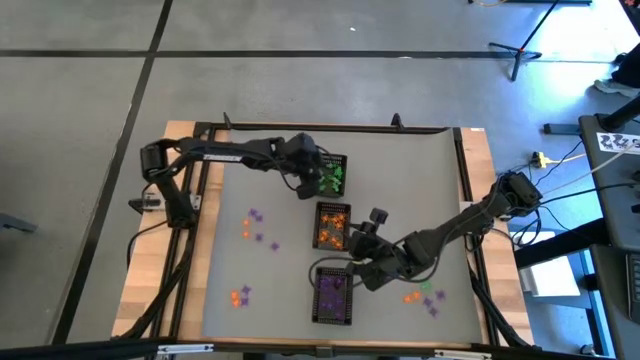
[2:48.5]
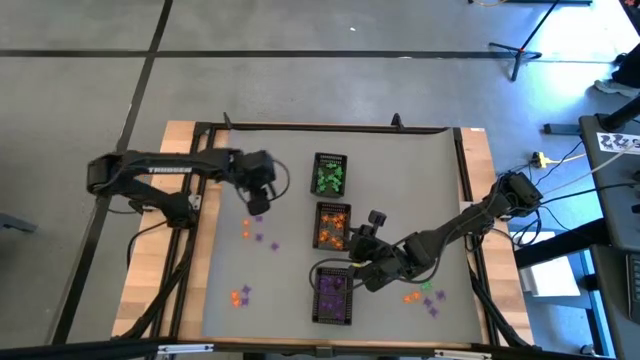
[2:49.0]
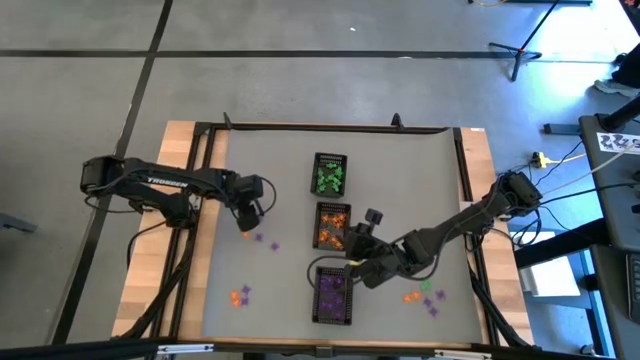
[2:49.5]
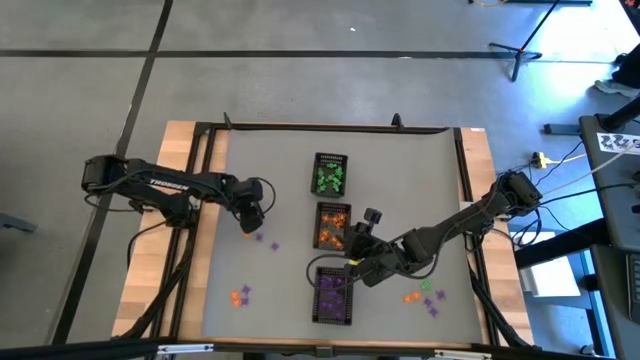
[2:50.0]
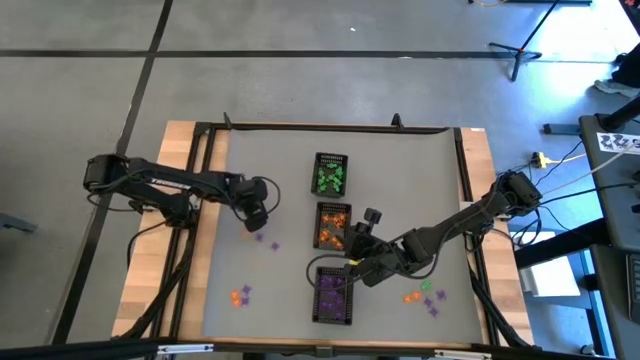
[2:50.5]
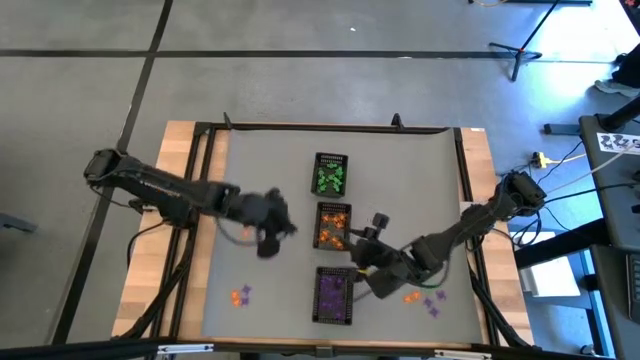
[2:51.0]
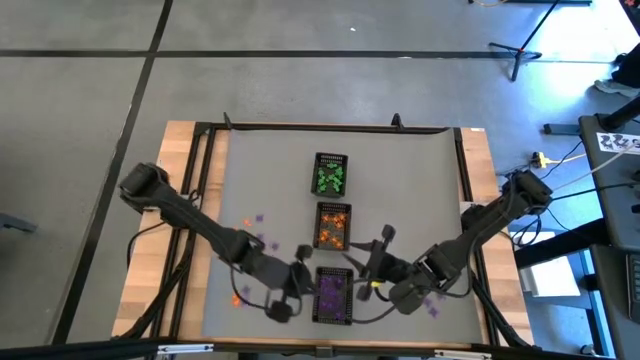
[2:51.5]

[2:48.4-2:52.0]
Task: Sort Halloween decoration
Put the violet spider toy into the bottom black bin

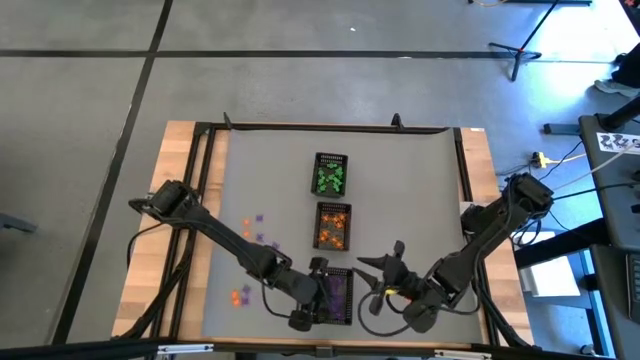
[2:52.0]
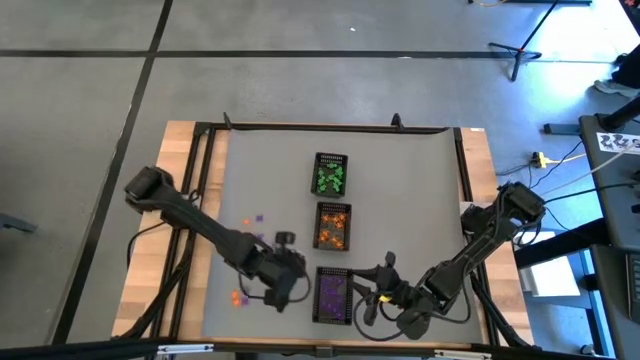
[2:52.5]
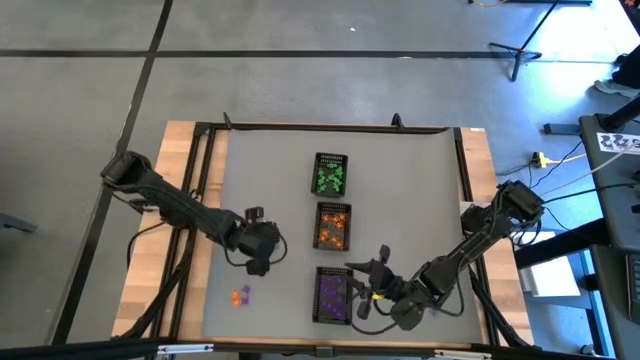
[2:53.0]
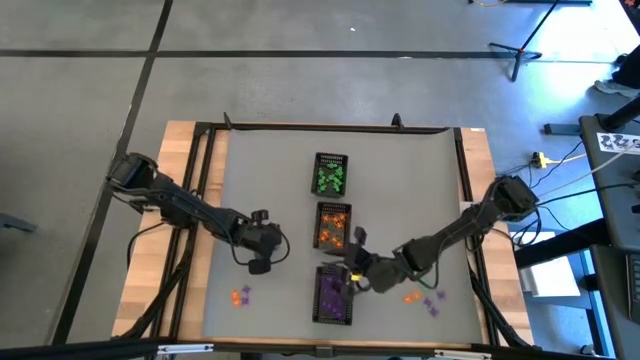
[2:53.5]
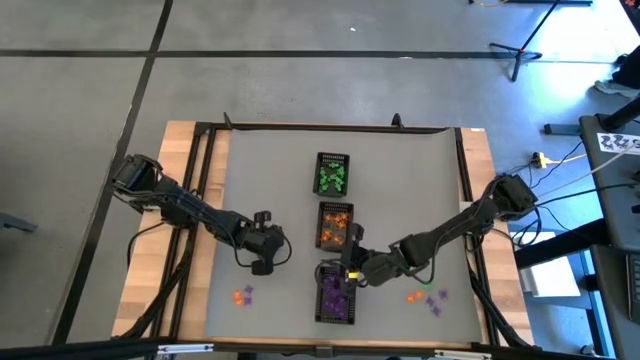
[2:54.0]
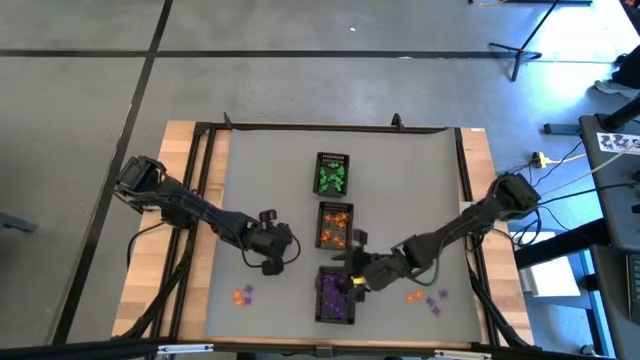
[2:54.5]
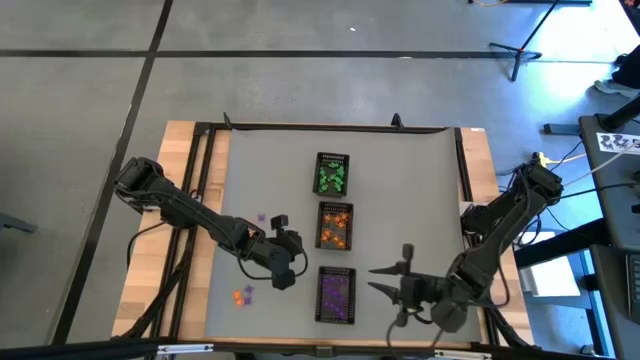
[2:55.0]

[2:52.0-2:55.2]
Put the violet spider toy into the bottom black bin

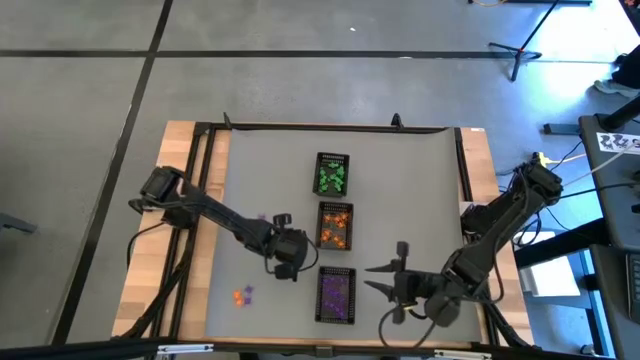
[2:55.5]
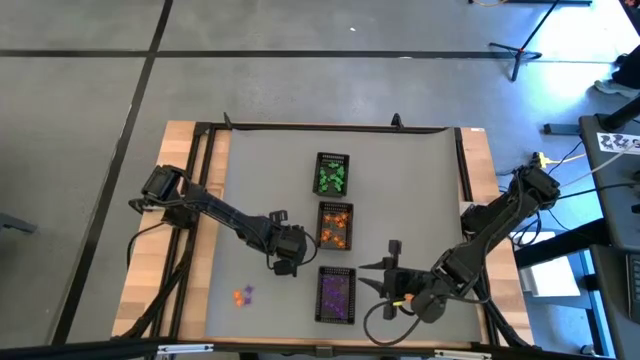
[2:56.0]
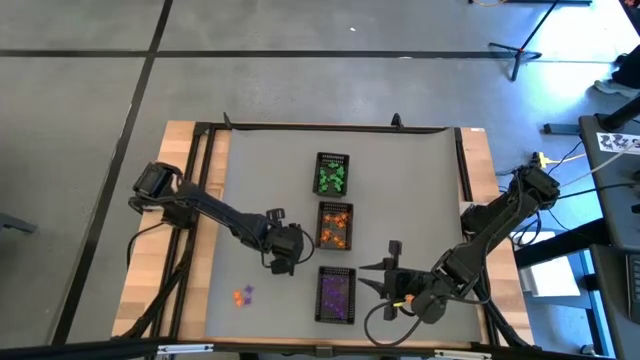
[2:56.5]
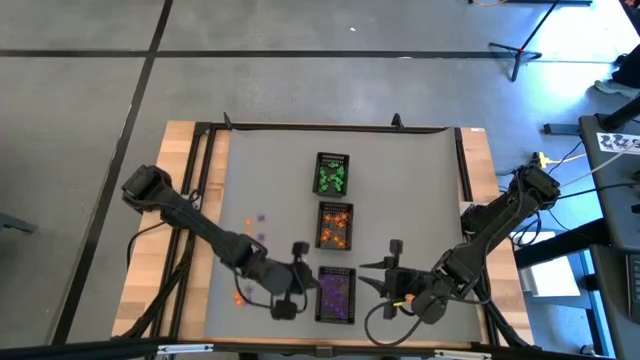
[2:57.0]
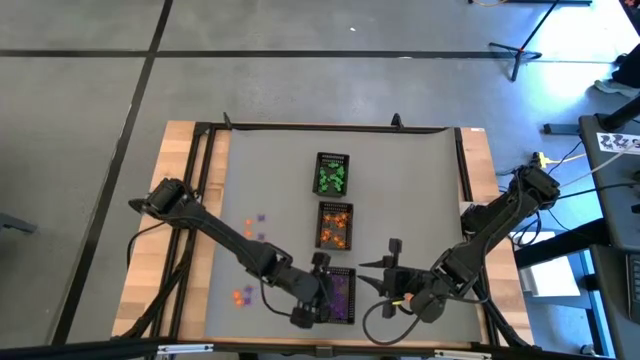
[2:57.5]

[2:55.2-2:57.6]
Put the violet spider toy into the bottom black bin

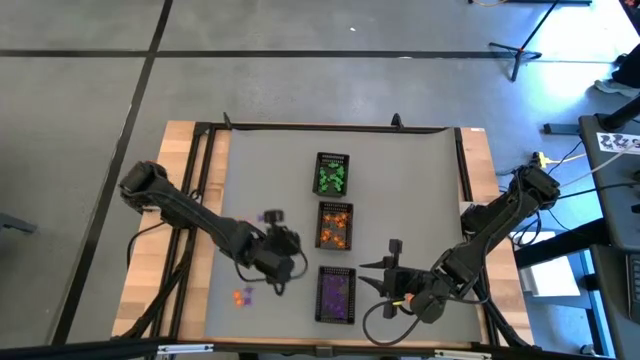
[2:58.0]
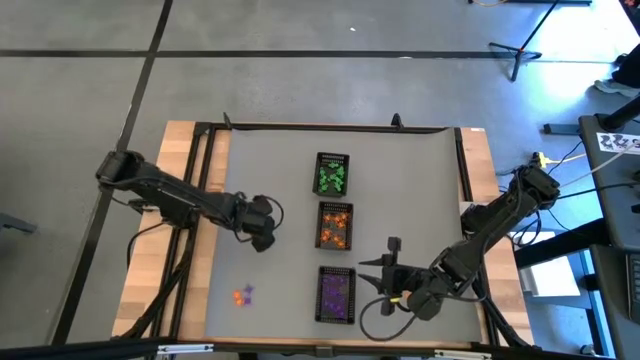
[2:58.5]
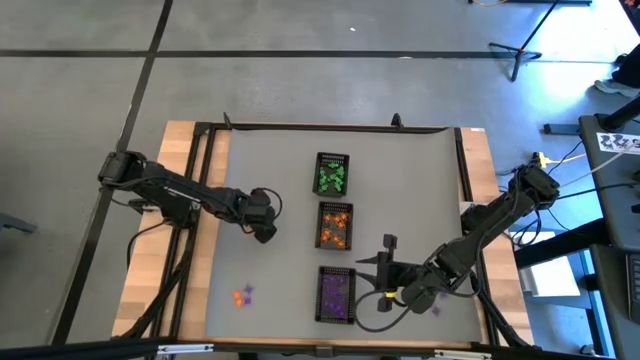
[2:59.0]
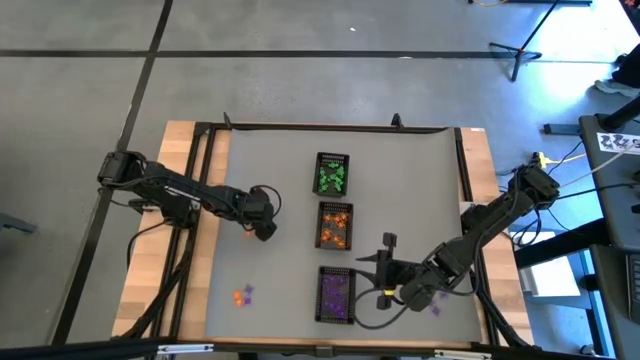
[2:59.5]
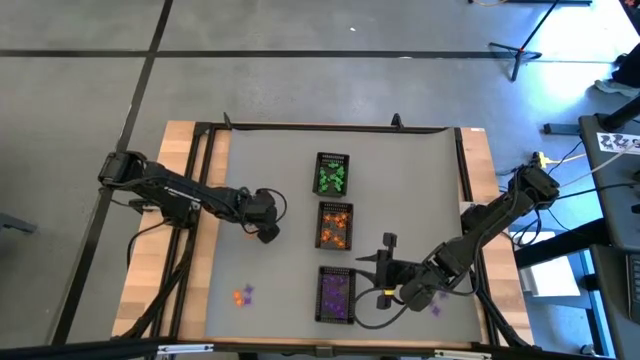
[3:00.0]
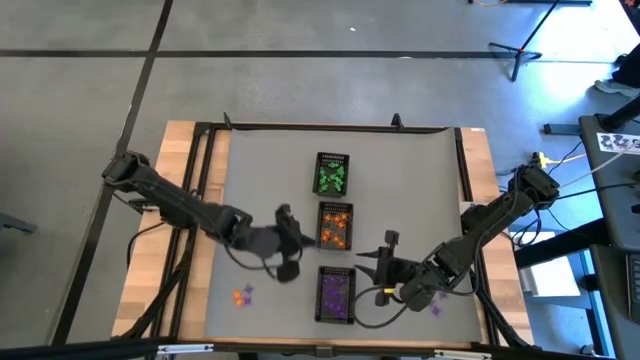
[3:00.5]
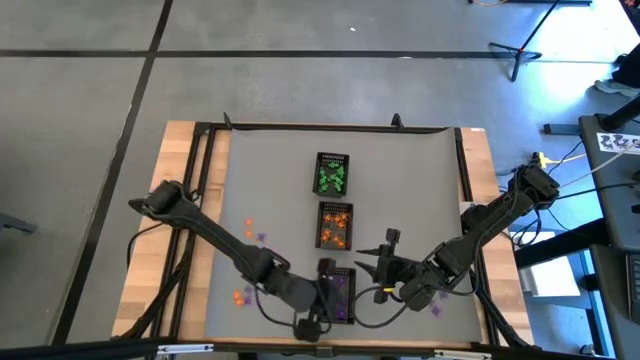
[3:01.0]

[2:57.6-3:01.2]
Put the violet spider toy into the bottom black bin

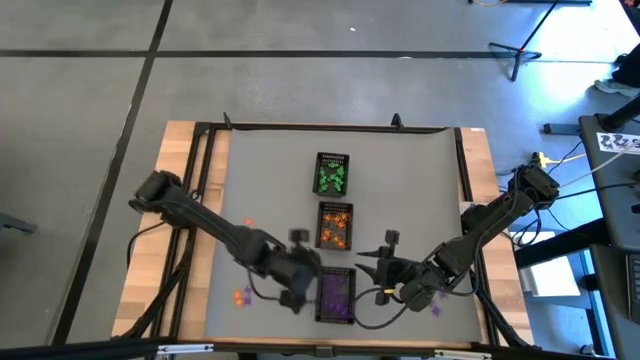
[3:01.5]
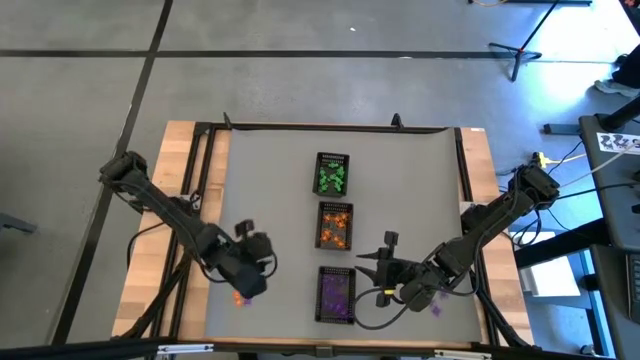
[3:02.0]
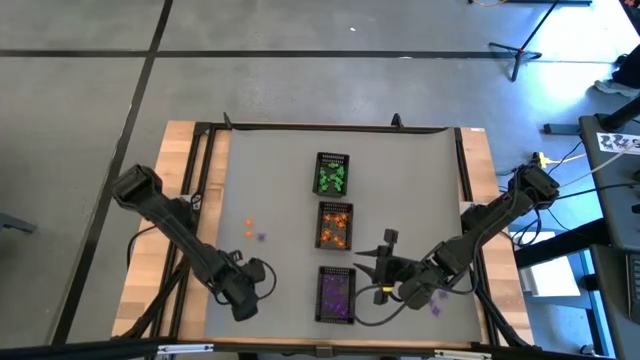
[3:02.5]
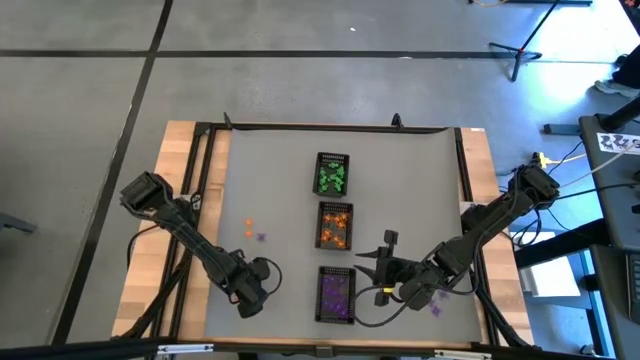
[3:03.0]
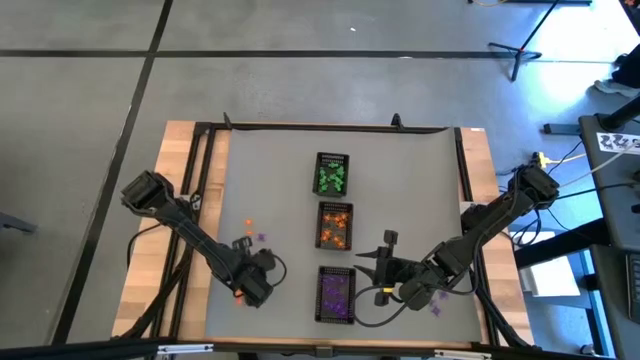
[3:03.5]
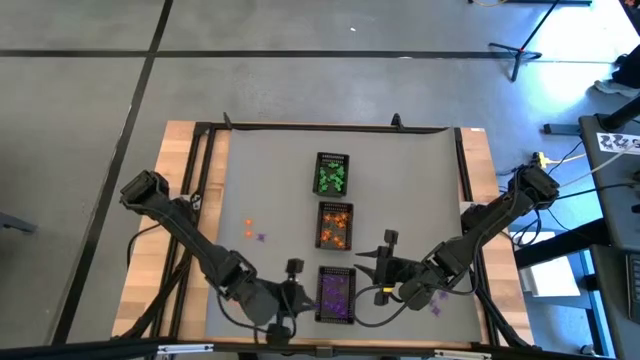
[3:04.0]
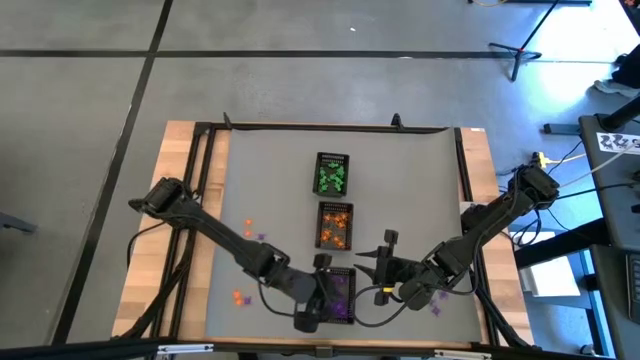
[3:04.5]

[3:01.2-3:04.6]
Put the violet spider toy into the bottom black bin

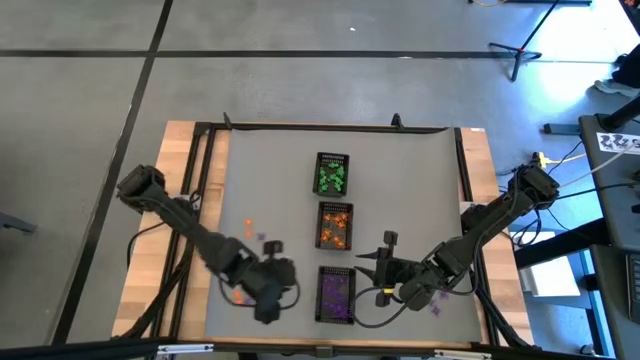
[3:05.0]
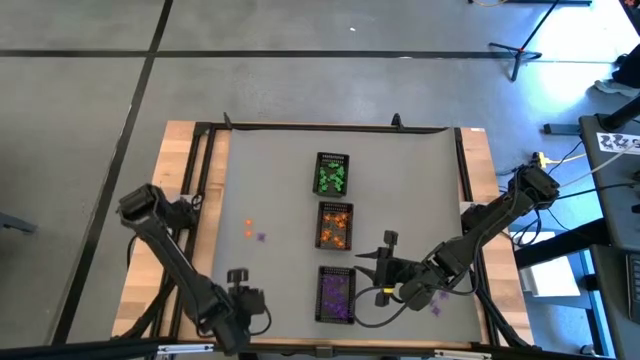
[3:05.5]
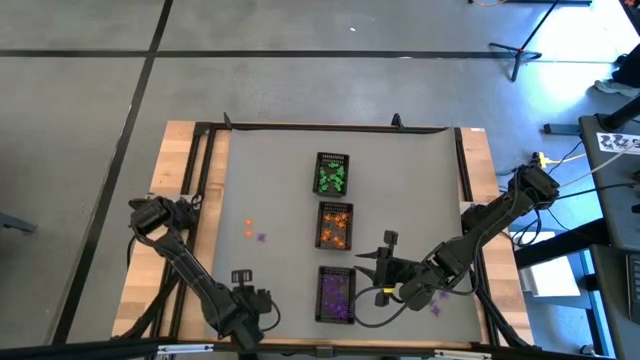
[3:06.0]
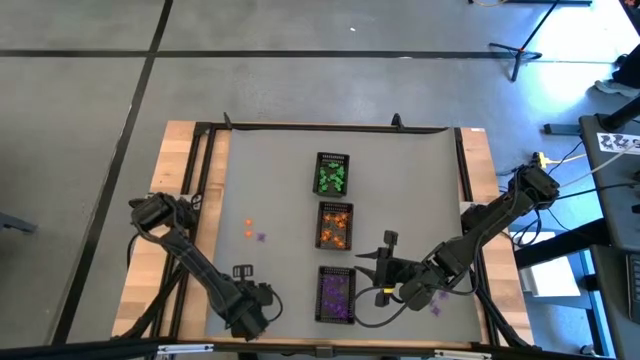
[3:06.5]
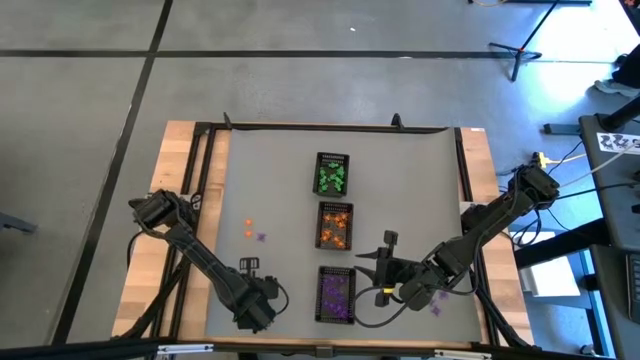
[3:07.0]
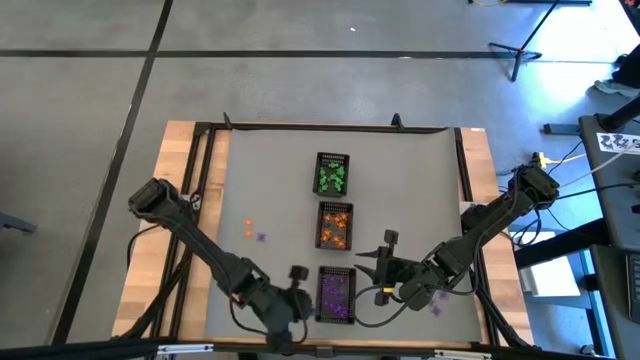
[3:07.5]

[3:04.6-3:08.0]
Put the violet spider toy into the bottom black bin
